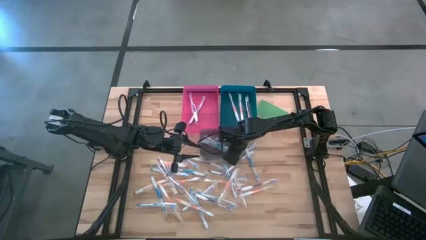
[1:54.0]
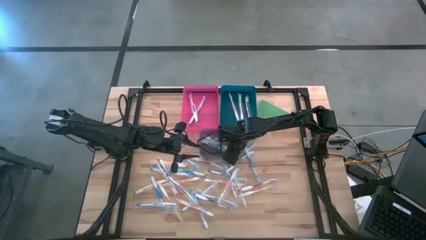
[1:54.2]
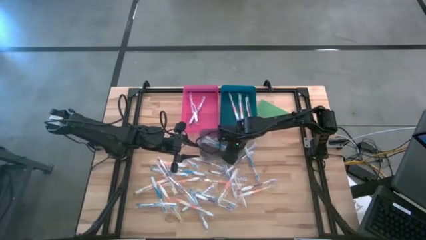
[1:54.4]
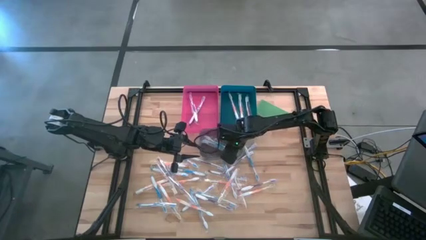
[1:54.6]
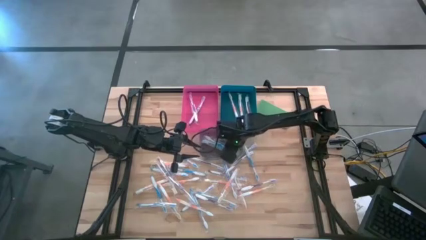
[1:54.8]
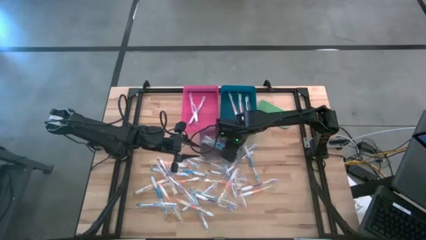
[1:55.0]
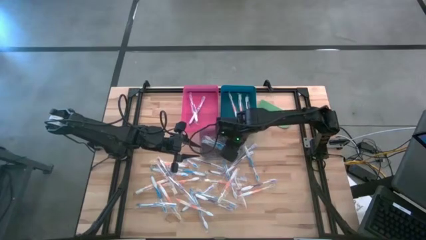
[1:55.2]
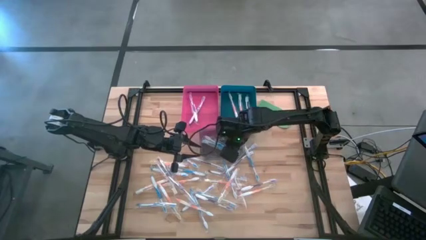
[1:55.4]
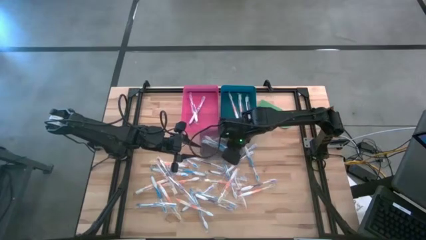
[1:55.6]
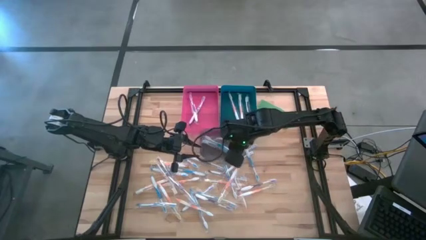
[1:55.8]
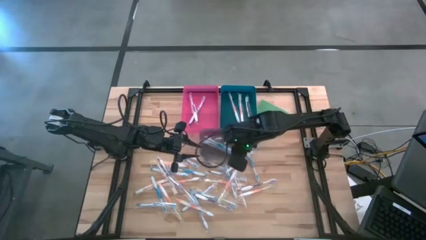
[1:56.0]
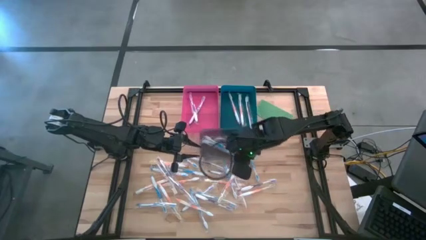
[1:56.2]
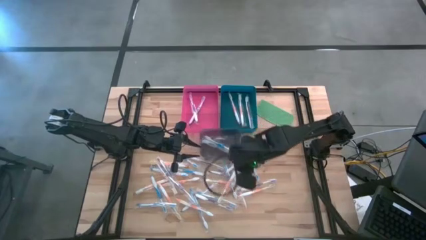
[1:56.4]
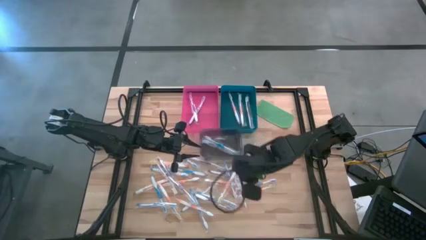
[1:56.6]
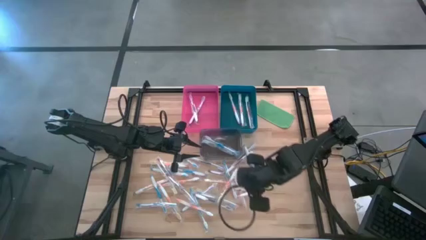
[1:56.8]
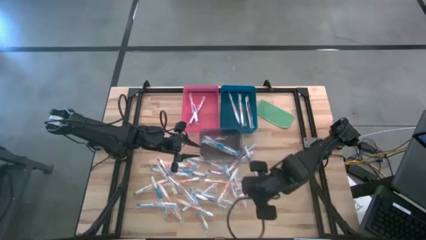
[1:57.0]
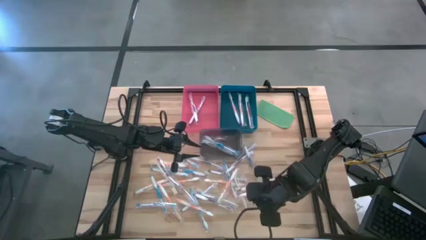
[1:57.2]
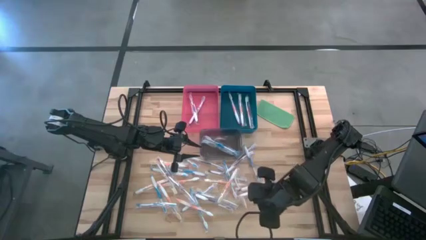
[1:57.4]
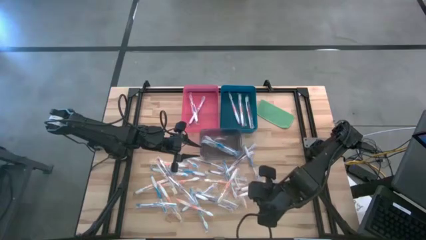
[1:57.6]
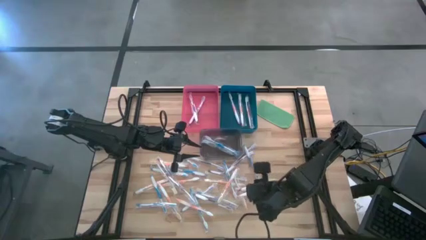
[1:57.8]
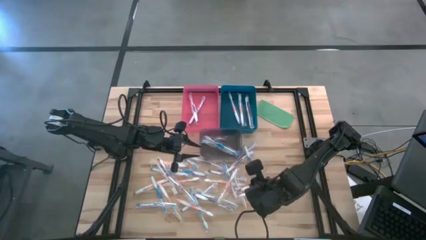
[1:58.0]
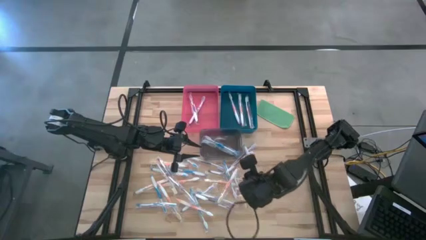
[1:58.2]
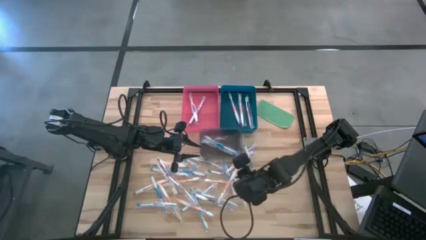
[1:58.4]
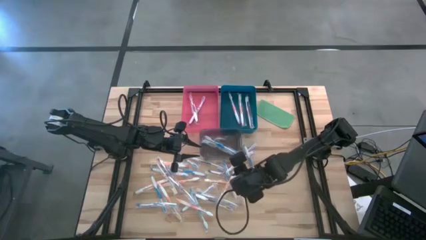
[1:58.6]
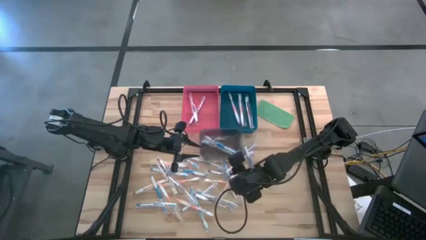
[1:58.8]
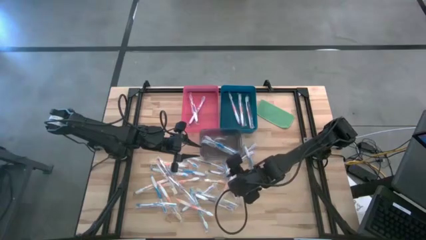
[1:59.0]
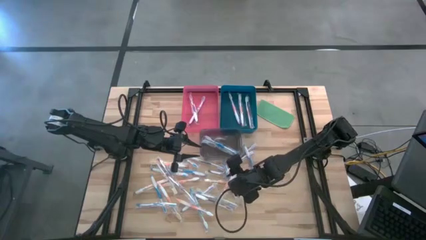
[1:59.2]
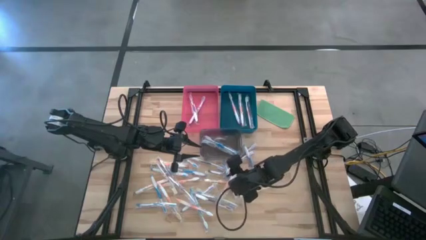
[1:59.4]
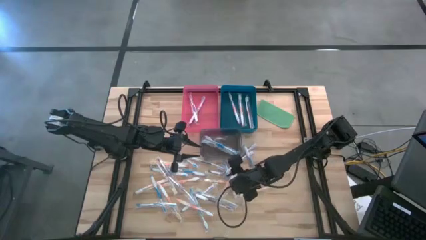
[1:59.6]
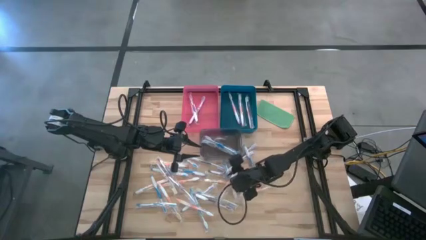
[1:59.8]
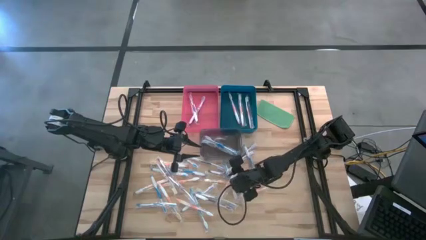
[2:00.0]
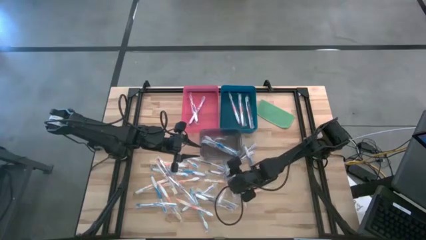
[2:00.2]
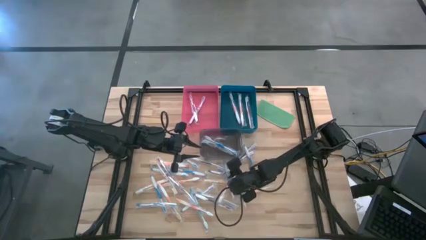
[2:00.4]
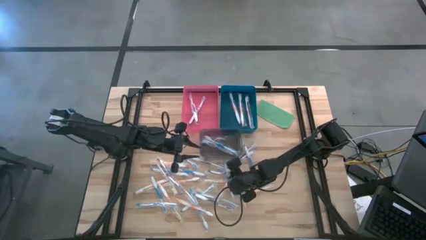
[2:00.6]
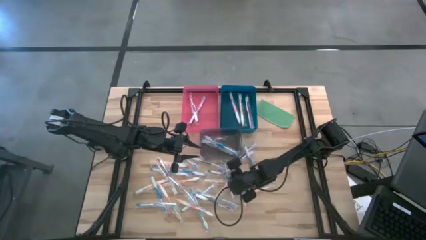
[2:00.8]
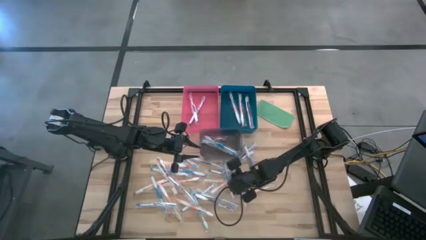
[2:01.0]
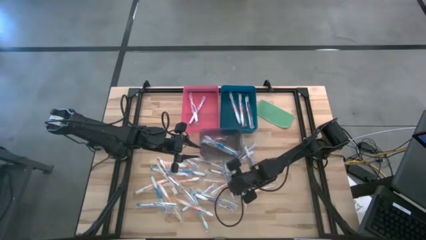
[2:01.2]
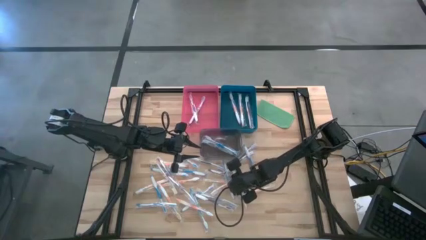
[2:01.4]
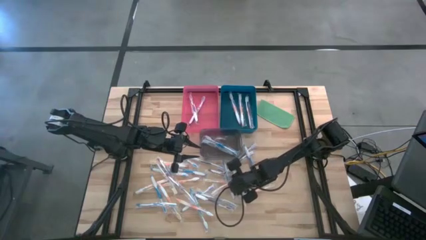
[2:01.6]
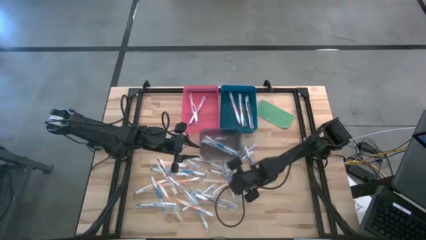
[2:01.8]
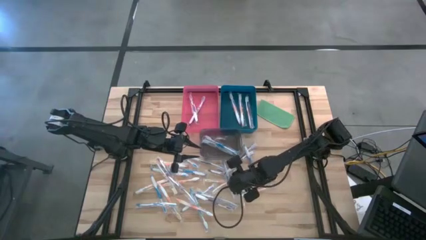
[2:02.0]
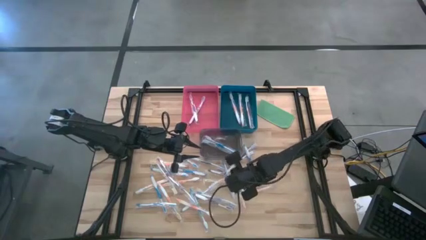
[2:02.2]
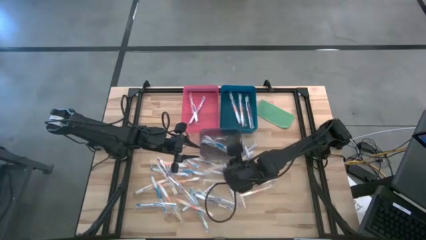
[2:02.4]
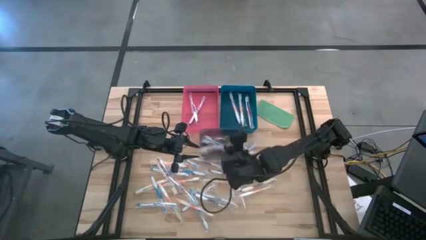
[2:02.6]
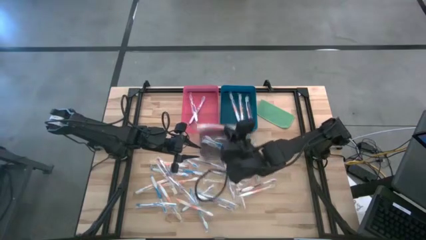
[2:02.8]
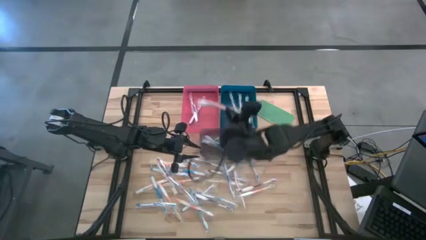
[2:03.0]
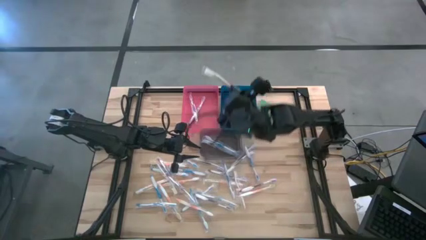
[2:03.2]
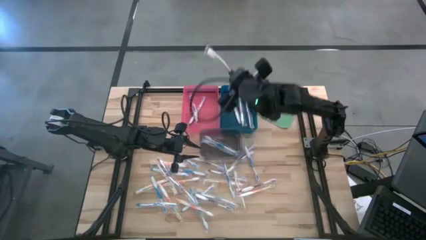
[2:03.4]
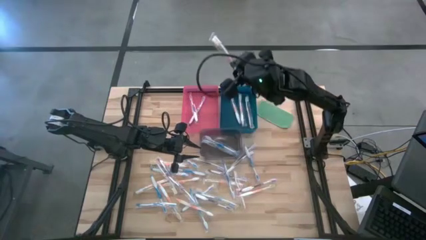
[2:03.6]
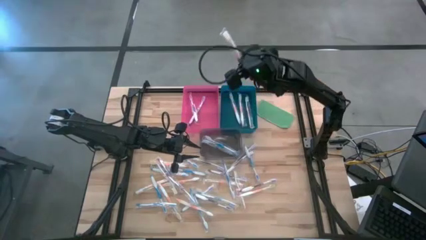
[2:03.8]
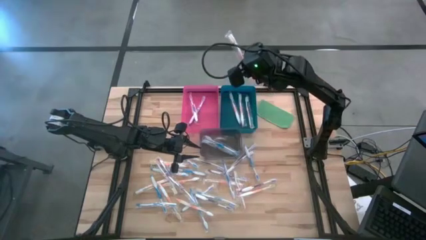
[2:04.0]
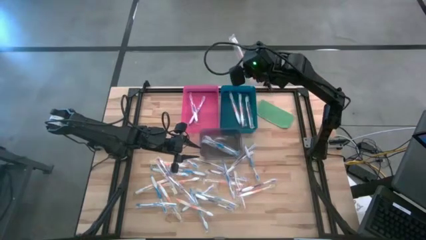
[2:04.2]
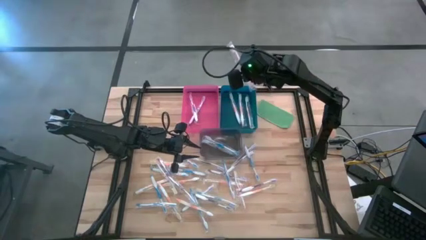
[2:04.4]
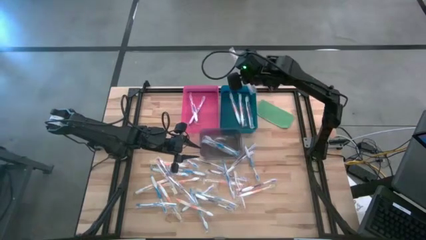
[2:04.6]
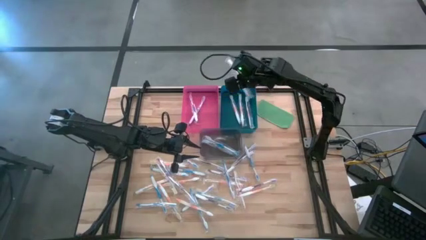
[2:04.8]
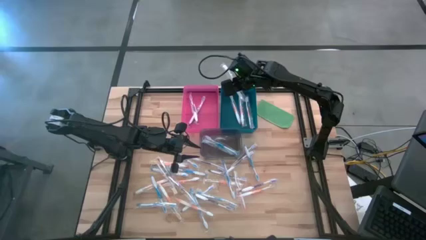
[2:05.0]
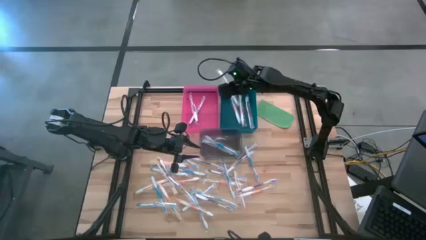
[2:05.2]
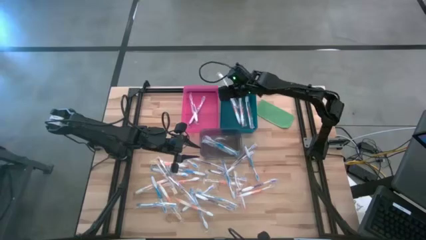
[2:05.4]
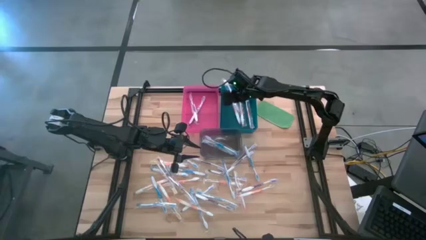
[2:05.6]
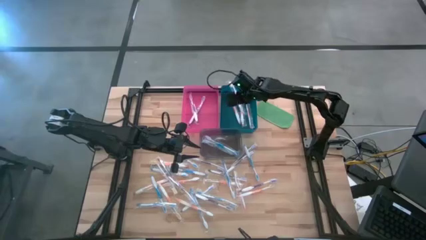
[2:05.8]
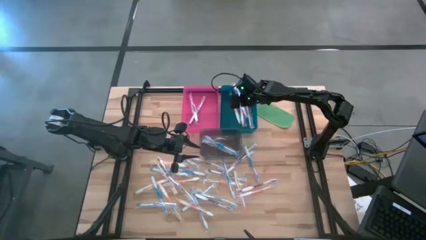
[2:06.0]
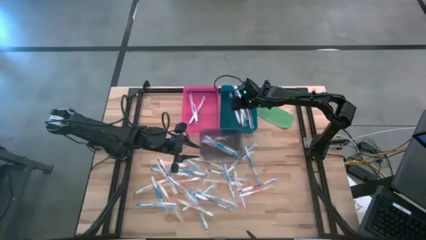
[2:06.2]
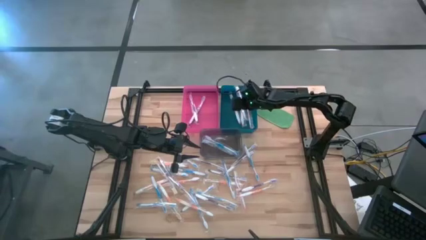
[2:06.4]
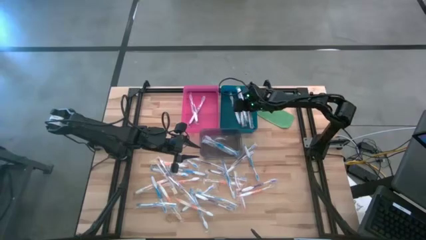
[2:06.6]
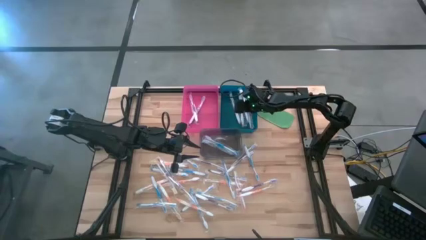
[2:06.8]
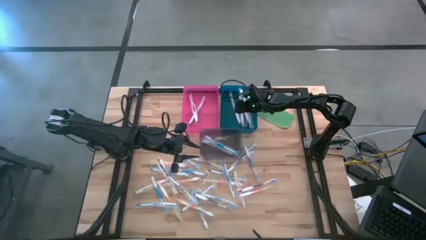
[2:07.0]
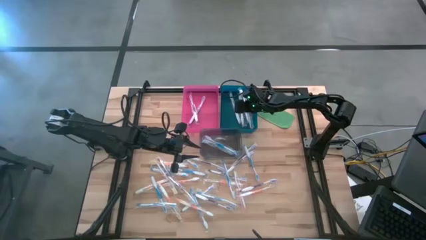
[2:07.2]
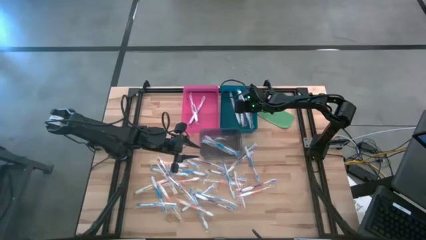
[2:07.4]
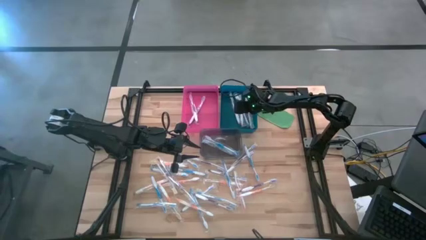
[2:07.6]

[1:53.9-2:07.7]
Task: Pick & Place Toothbrushes
Put the orange toothbrush into the blue bin

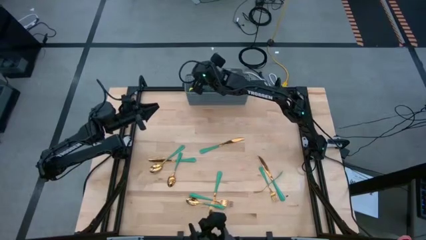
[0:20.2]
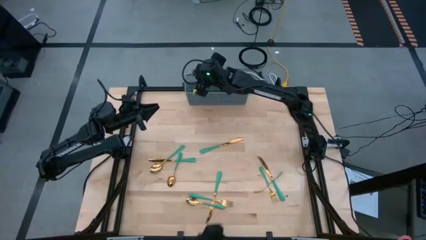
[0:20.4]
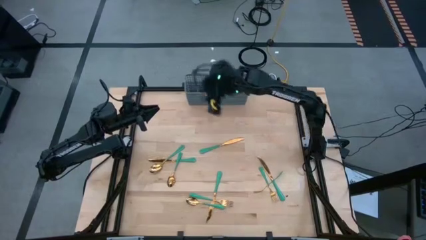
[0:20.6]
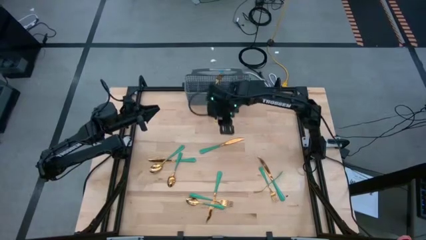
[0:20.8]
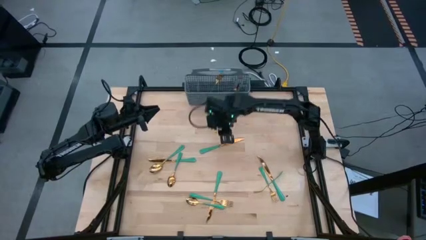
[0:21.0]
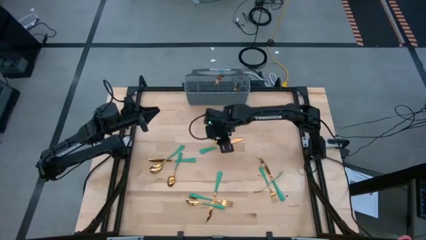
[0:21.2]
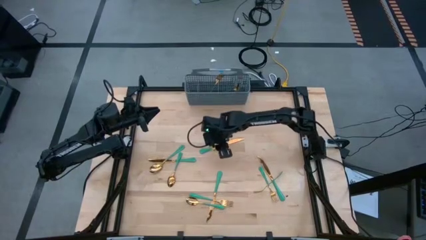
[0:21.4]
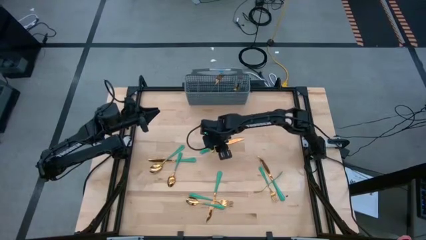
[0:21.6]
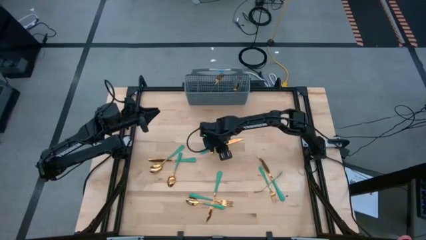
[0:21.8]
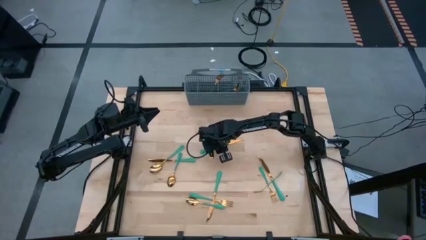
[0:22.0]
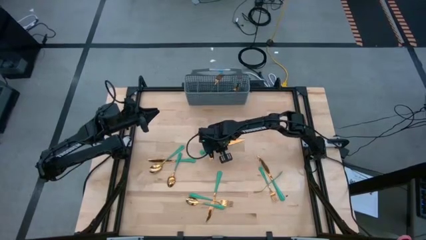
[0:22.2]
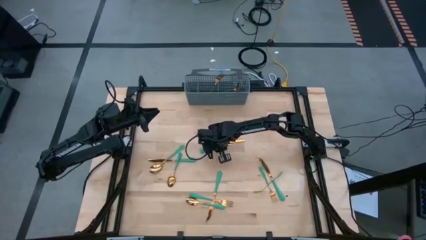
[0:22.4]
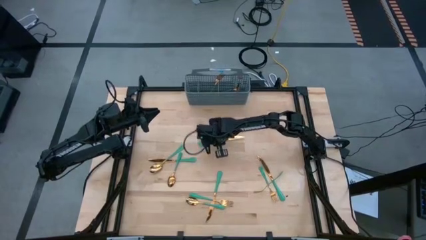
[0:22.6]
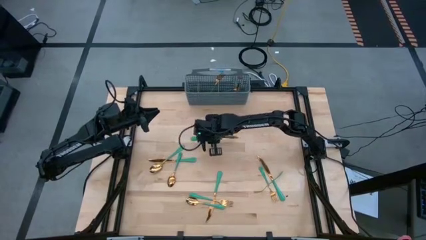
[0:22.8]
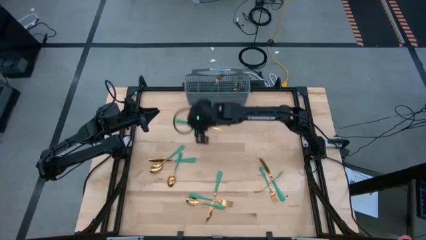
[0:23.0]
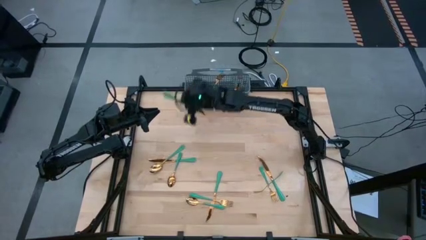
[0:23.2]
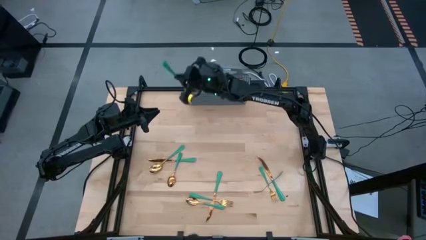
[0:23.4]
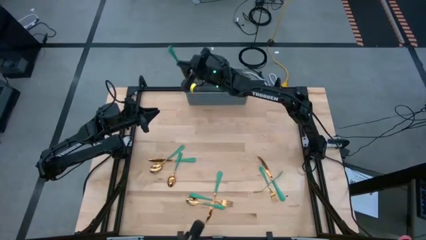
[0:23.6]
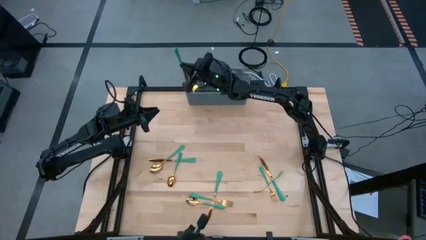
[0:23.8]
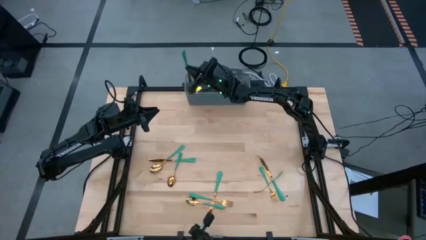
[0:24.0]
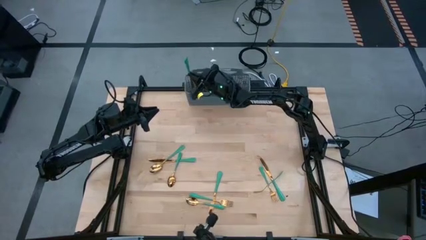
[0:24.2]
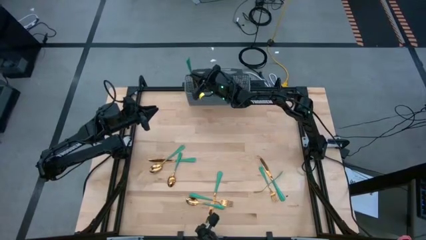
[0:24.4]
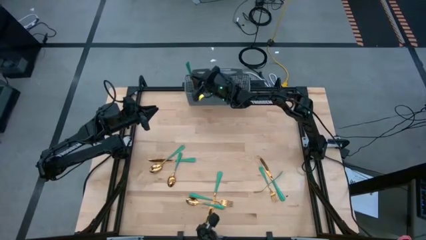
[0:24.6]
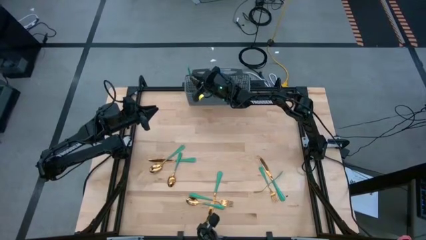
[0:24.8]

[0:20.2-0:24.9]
Task: Sort silverware
Put the green knife into the gray silverware organizer
